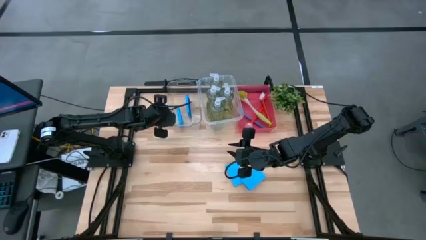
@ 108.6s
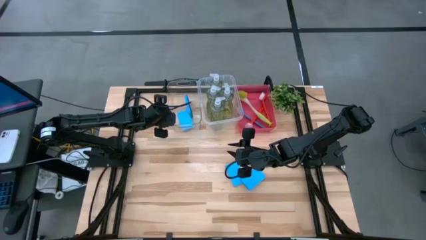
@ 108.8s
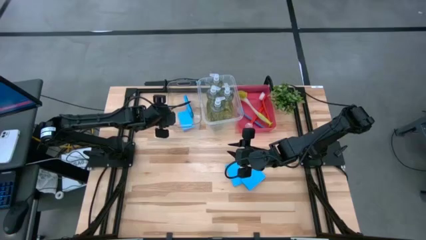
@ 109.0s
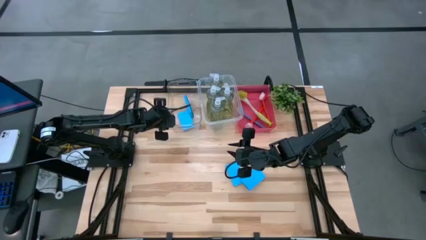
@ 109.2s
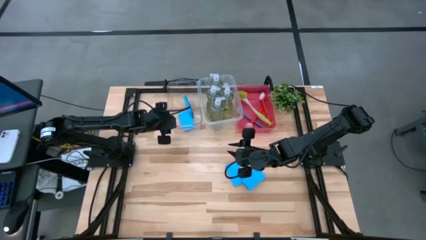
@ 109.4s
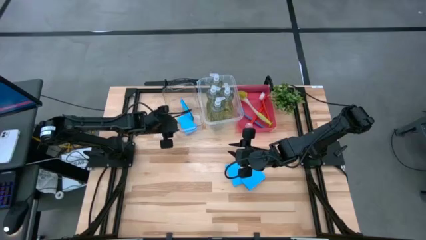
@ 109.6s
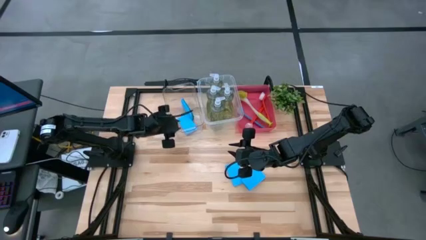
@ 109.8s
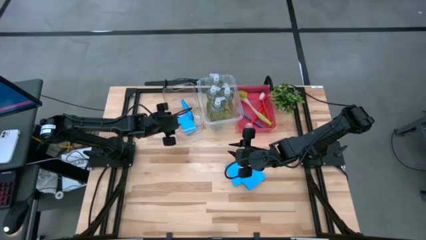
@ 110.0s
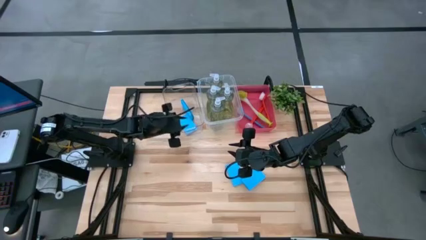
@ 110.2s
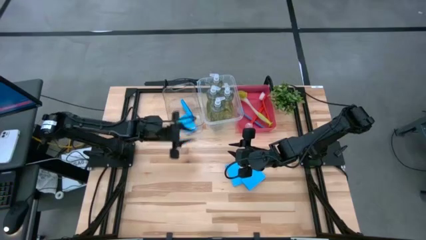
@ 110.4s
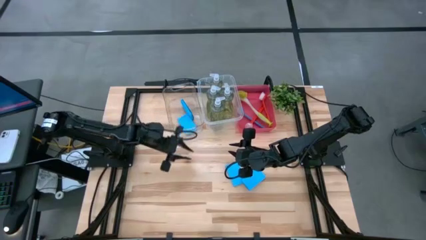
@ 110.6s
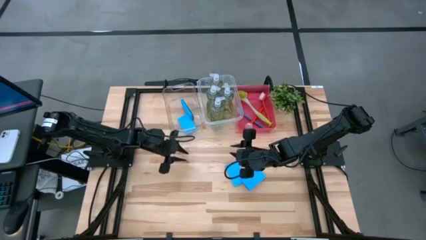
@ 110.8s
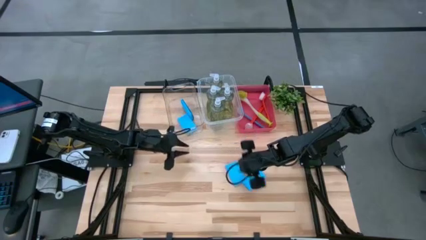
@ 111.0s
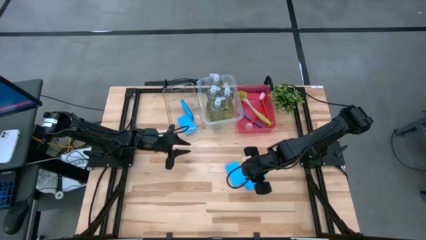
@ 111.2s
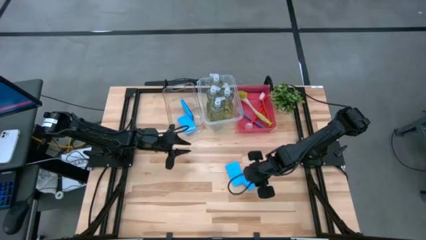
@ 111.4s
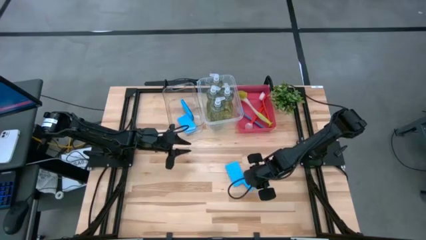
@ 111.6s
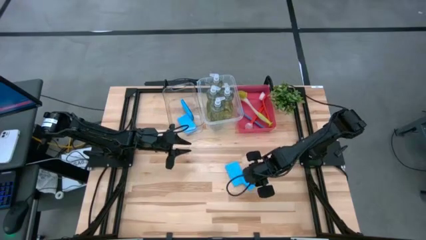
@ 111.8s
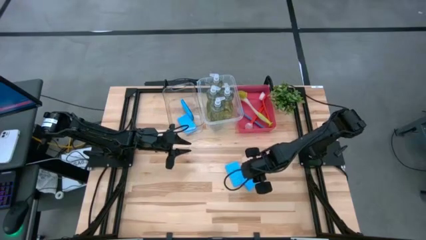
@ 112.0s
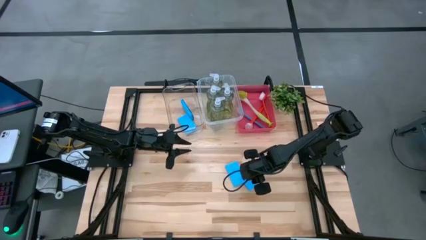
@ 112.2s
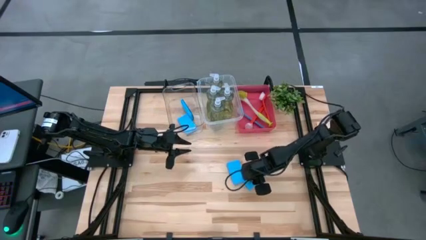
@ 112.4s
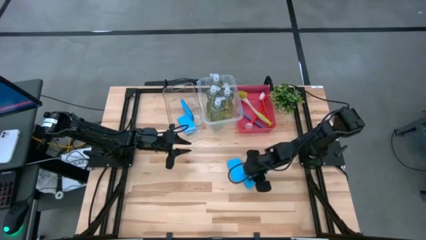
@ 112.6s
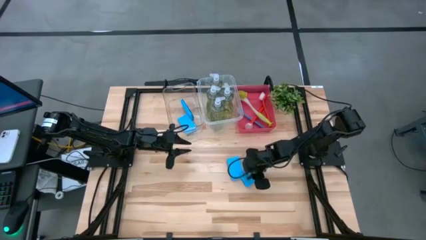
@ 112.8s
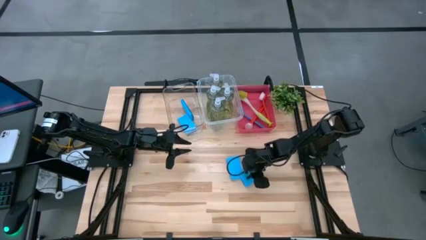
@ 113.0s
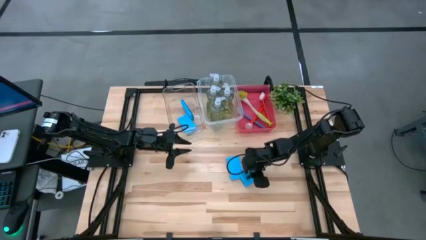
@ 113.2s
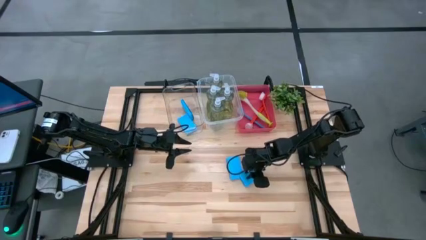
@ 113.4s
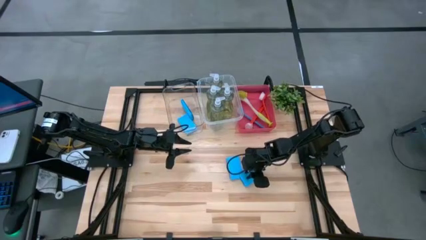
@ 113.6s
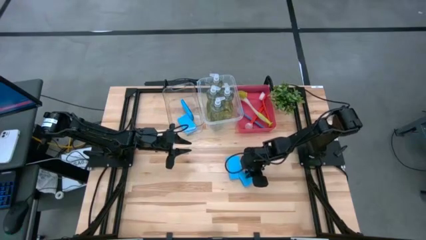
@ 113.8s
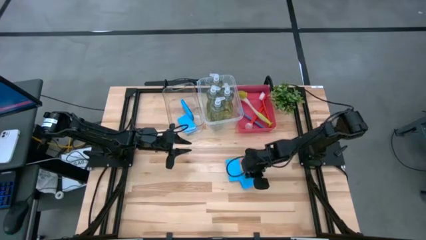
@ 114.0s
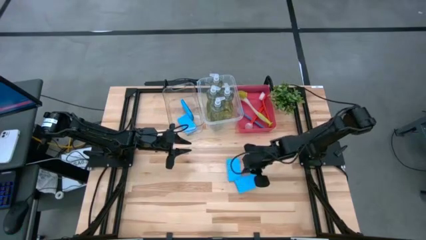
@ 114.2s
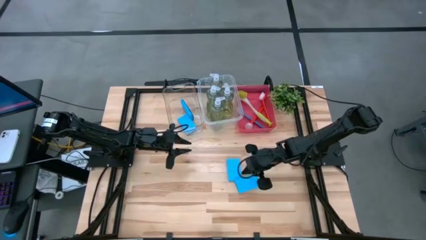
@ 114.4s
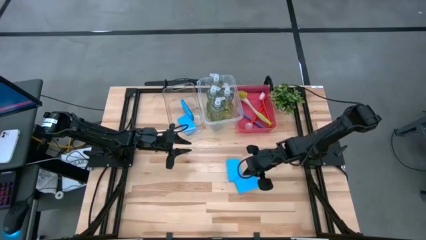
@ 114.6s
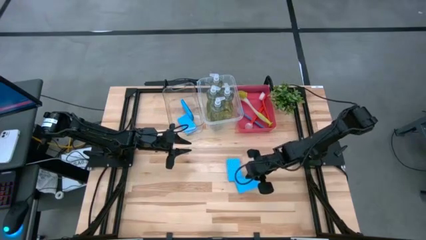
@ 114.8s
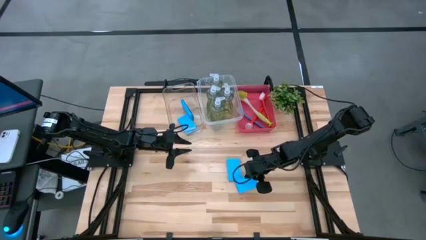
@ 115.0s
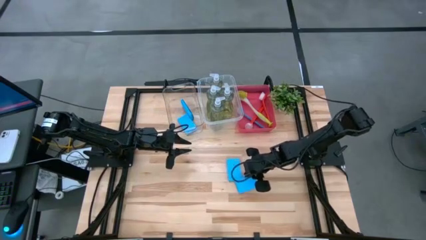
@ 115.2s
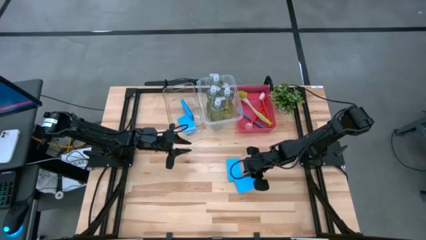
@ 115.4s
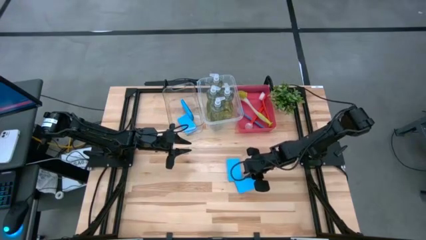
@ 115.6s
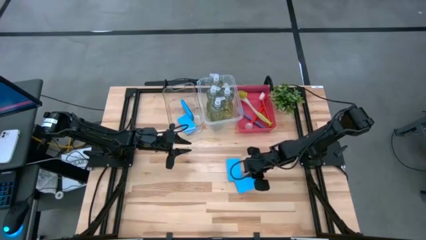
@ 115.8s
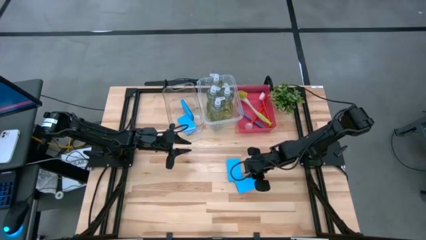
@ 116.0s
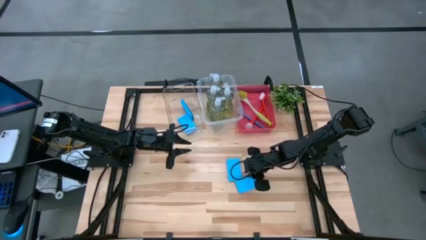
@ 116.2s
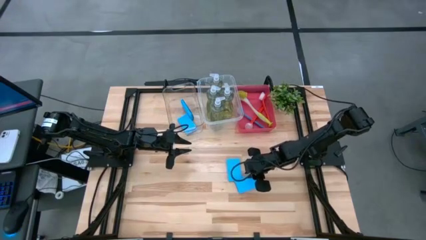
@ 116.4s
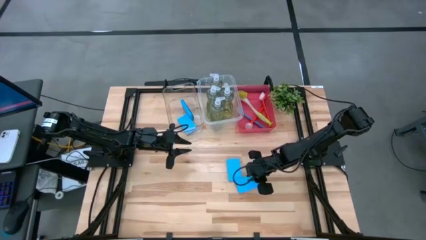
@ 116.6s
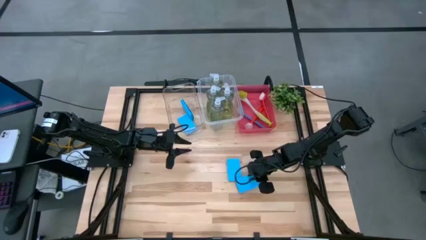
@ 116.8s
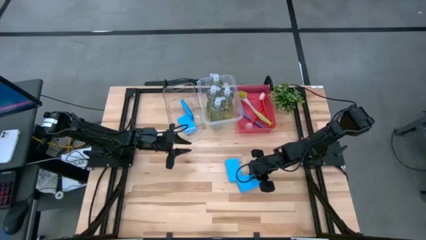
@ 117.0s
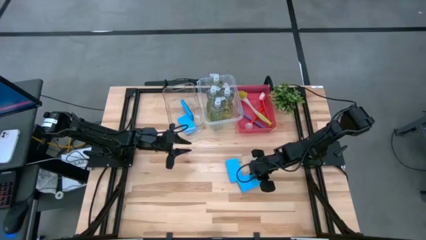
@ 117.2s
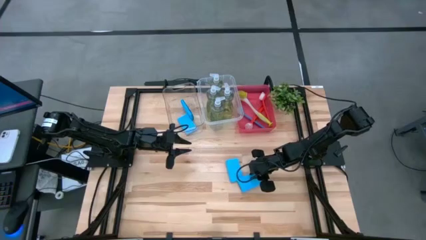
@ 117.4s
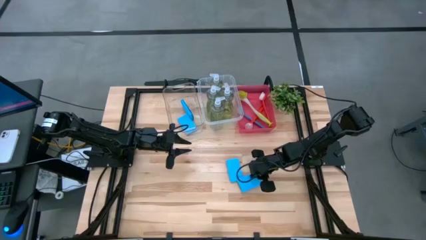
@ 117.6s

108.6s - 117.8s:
Task: Pick & Place Kitchen Sink Supplies
Put the blue sponge into the left transparent bin

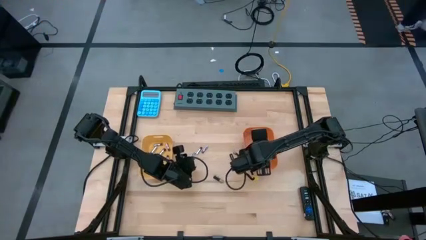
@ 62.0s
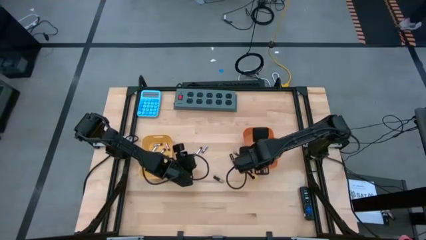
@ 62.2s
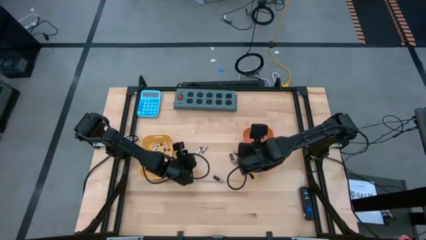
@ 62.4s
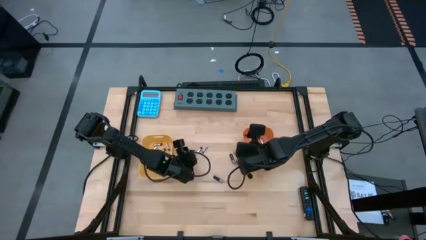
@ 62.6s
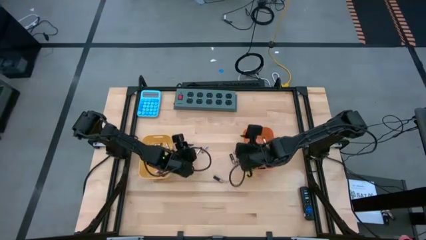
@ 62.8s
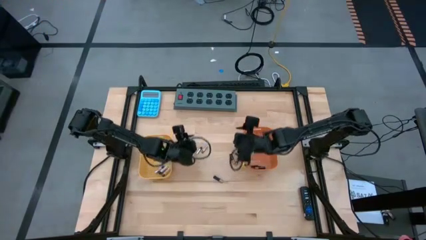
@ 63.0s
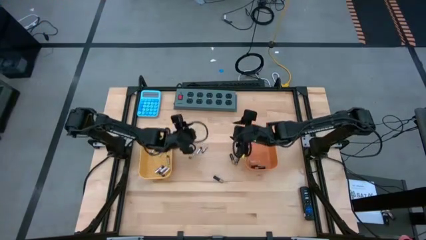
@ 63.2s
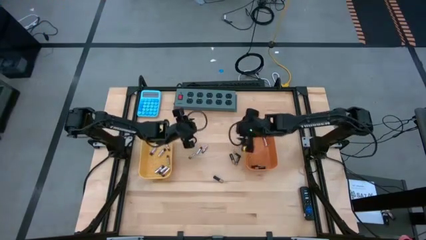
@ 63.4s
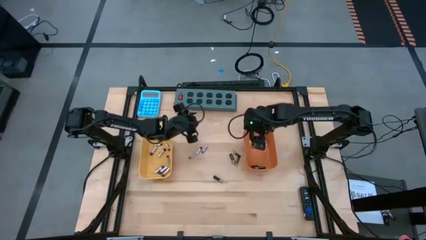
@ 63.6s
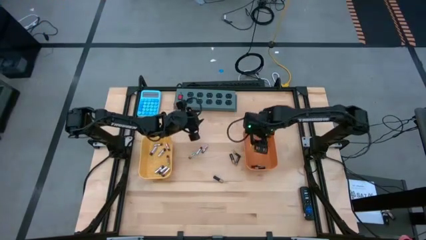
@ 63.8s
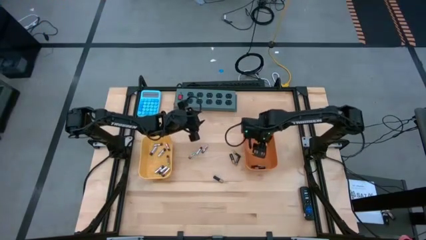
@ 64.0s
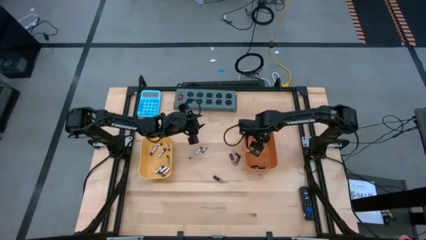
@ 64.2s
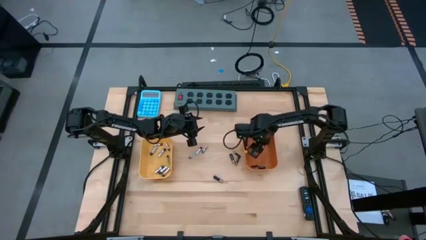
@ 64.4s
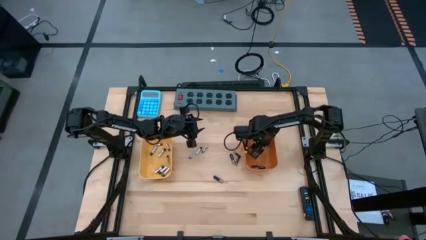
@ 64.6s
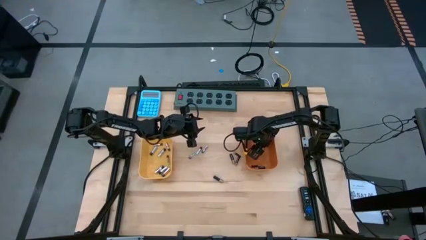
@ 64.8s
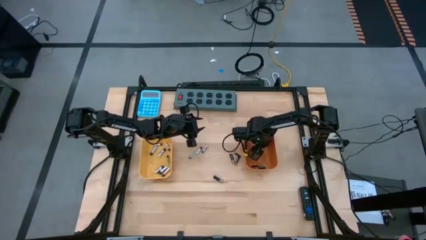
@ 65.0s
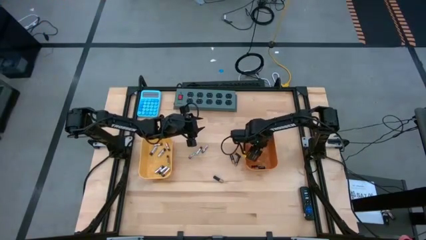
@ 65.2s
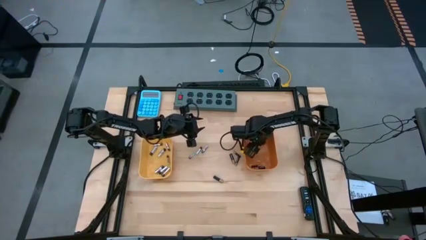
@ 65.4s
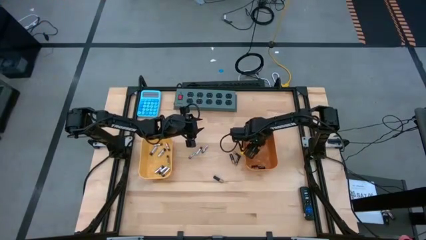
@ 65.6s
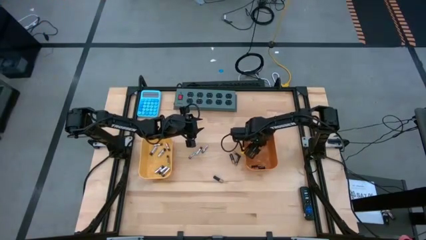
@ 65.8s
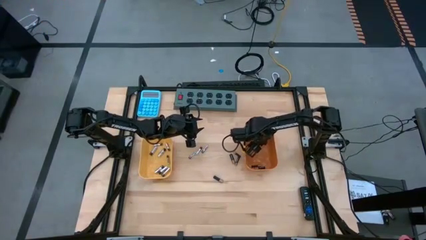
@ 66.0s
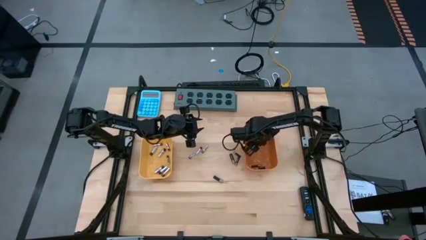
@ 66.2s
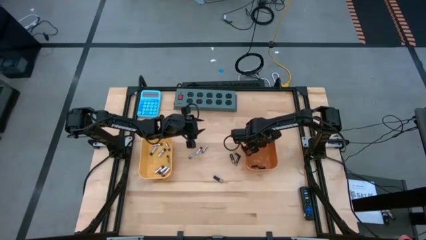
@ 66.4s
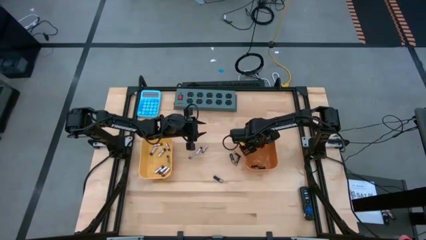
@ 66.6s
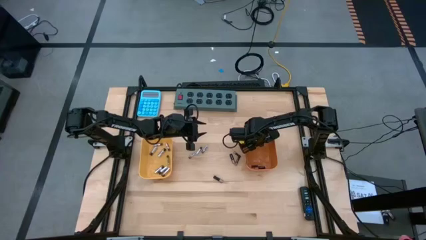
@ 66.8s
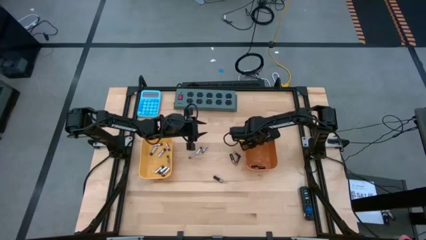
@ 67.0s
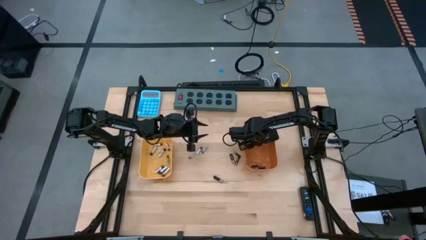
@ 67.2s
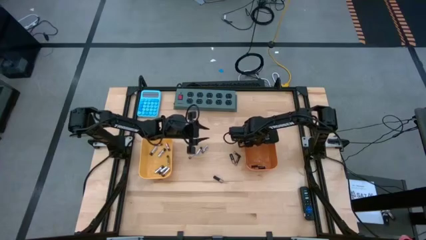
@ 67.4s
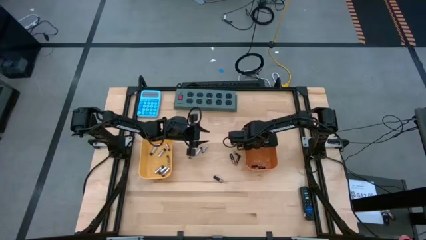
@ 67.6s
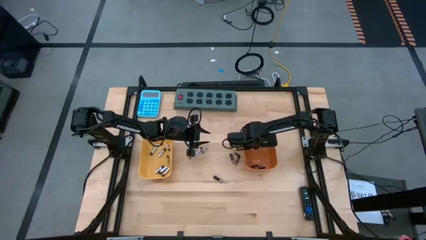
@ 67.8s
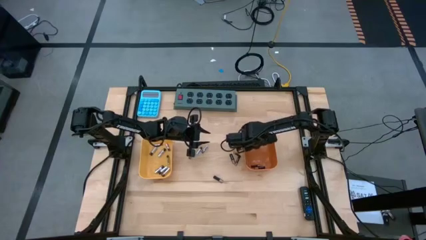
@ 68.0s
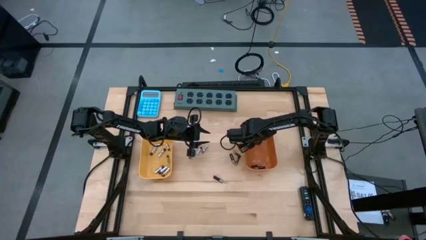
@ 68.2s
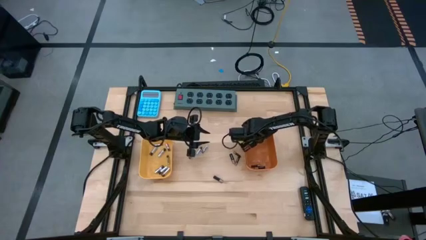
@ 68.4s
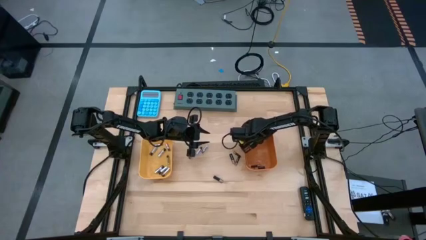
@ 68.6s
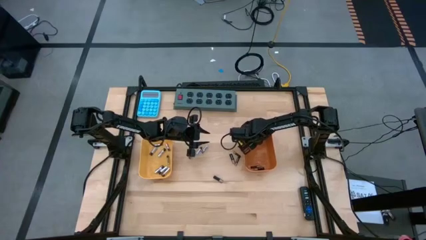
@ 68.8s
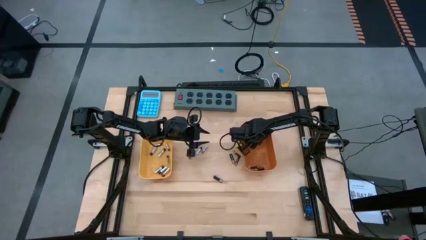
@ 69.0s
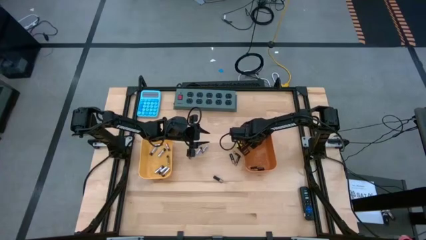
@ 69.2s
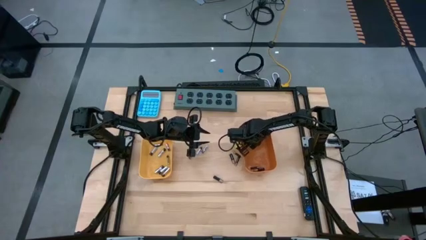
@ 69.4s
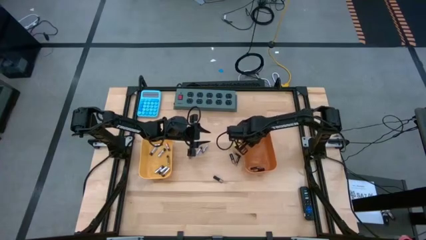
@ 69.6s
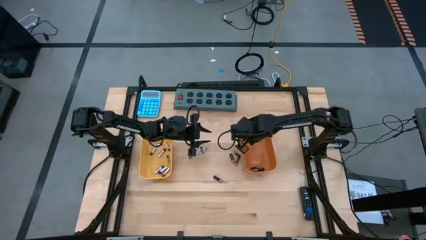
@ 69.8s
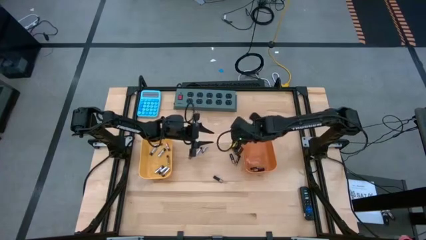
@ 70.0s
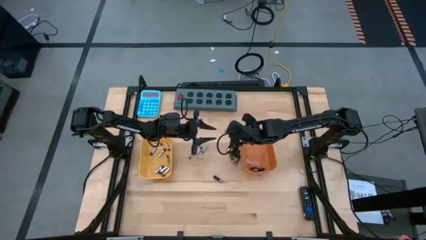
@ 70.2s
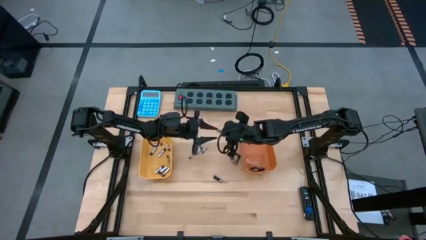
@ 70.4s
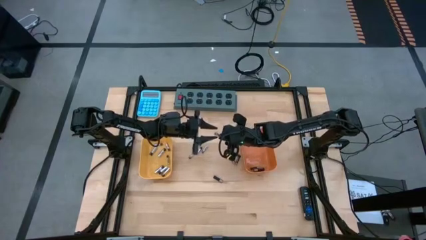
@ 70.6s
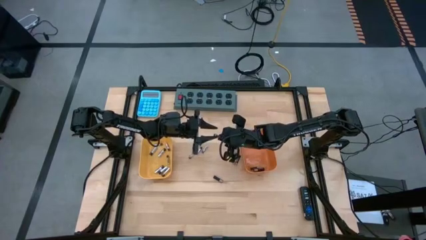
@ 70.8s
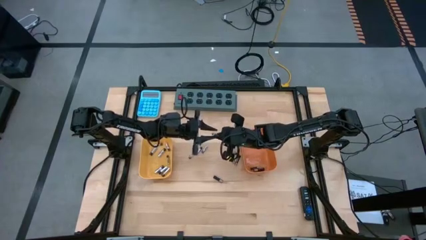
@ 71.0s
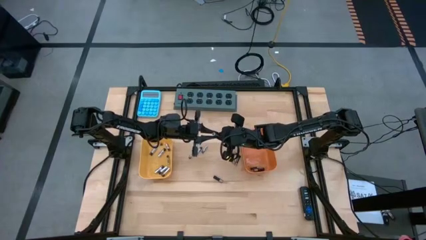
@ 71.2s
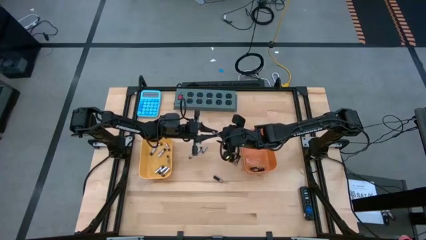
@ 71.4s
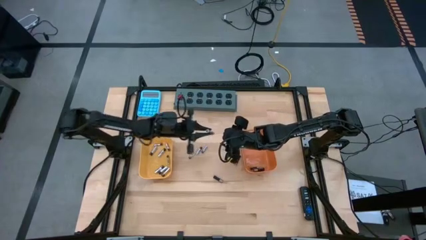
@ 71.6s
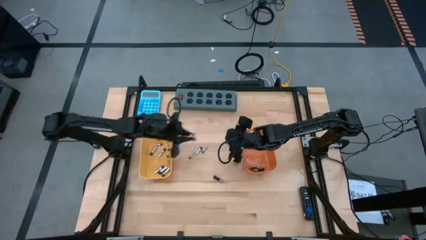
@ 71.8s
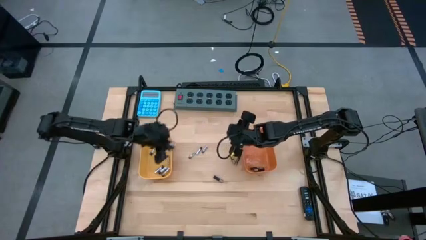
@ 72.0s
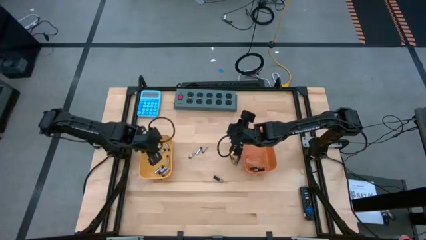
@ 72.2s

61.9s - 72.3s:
Task: Sort batteries
Put the silver battery into the yellow bin
